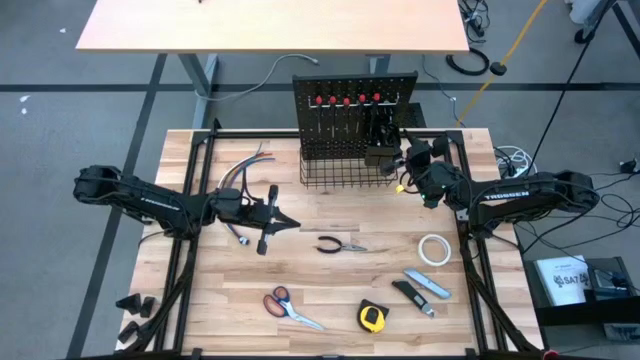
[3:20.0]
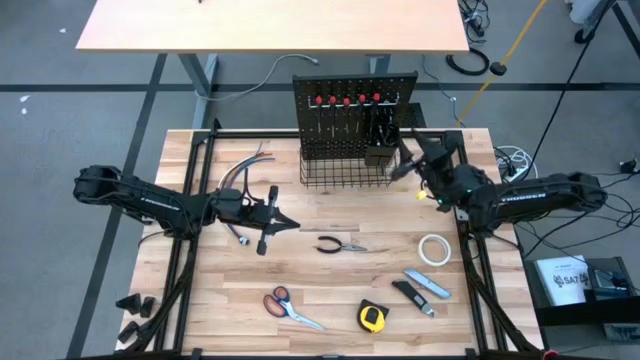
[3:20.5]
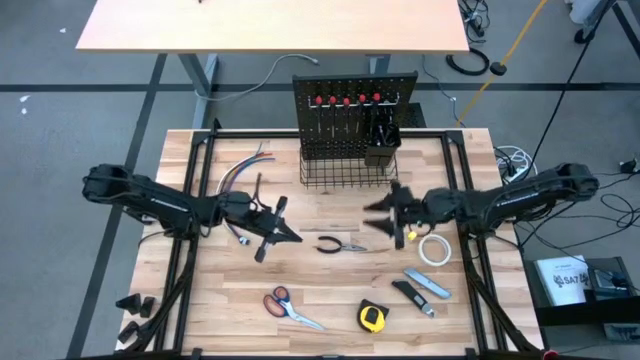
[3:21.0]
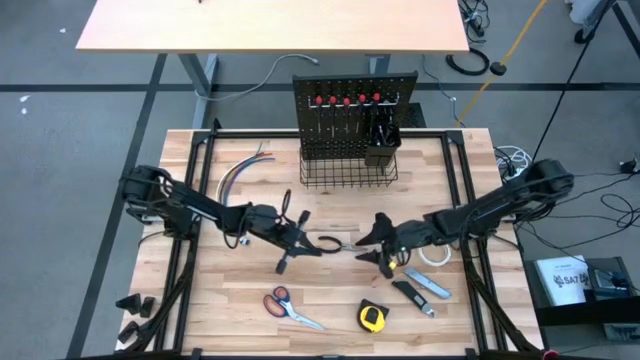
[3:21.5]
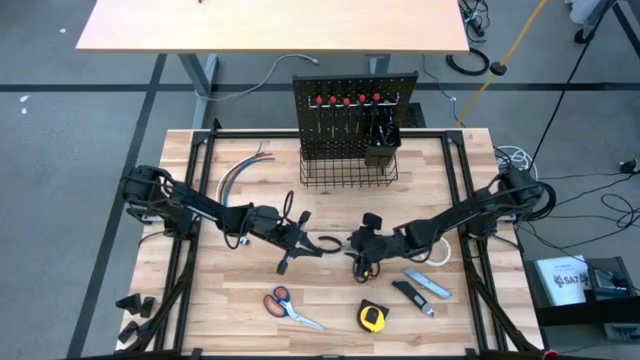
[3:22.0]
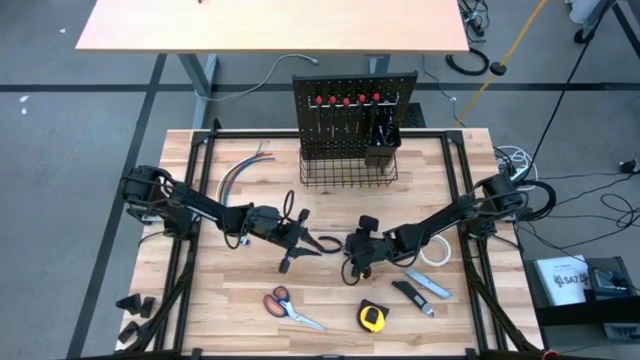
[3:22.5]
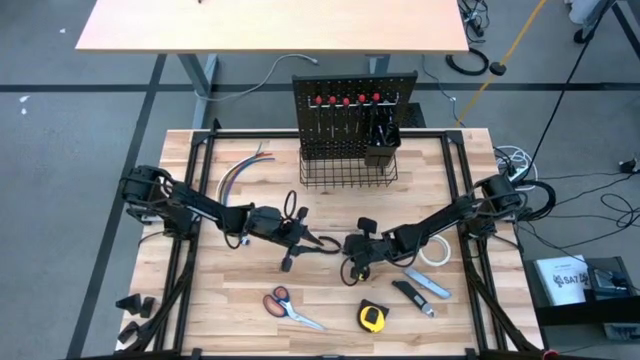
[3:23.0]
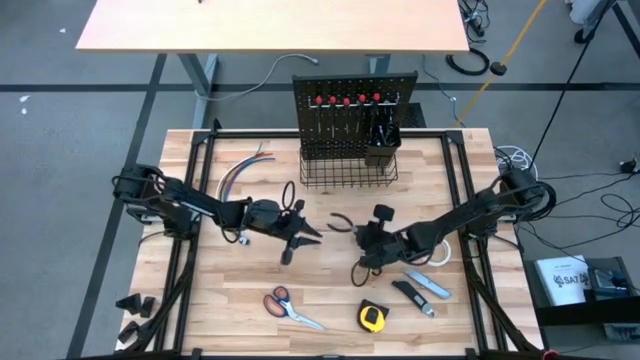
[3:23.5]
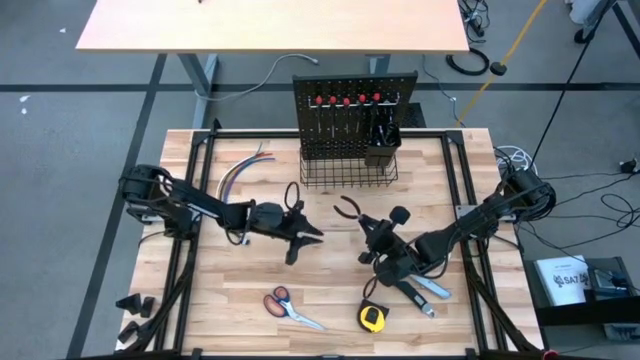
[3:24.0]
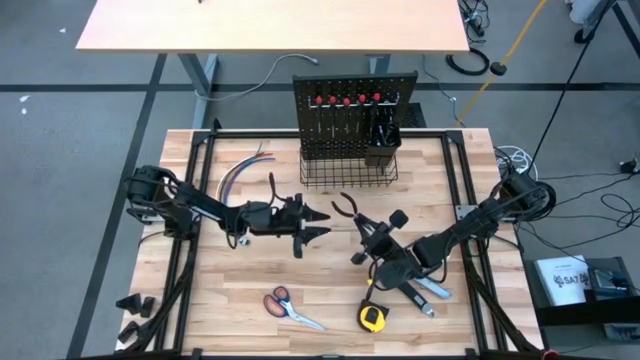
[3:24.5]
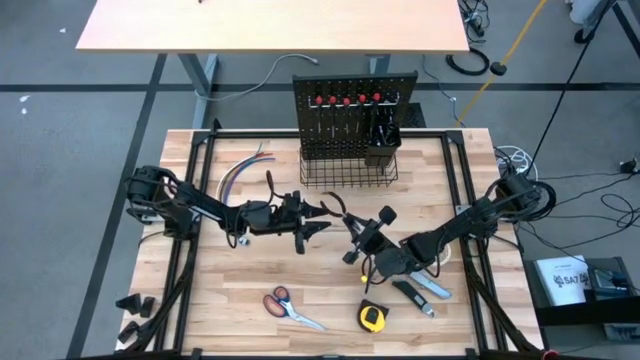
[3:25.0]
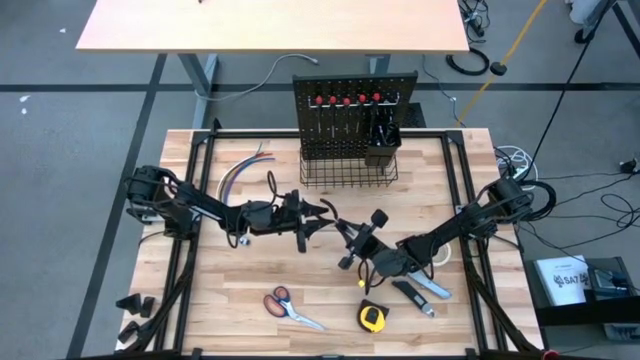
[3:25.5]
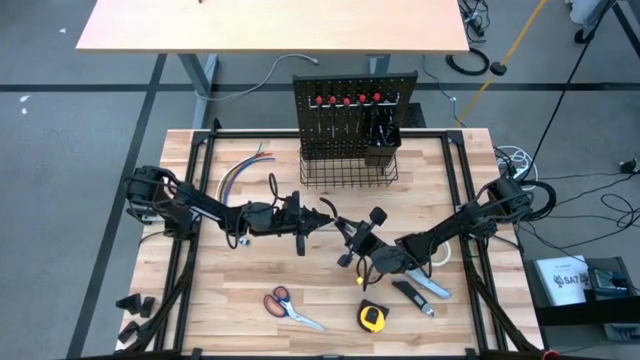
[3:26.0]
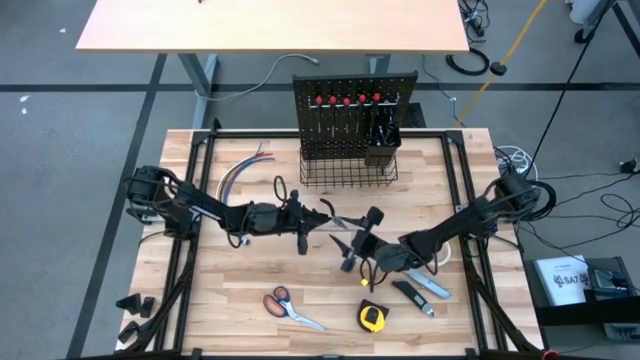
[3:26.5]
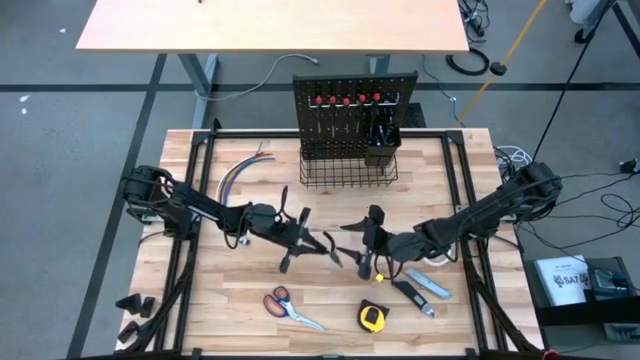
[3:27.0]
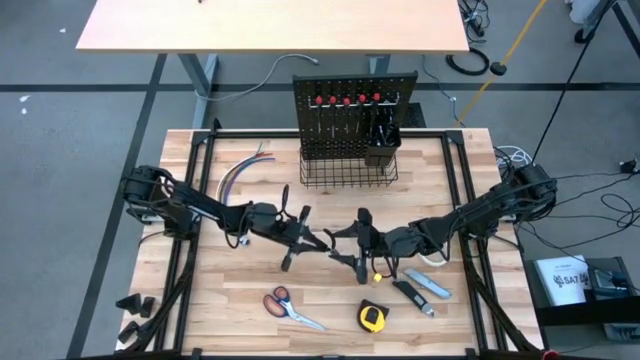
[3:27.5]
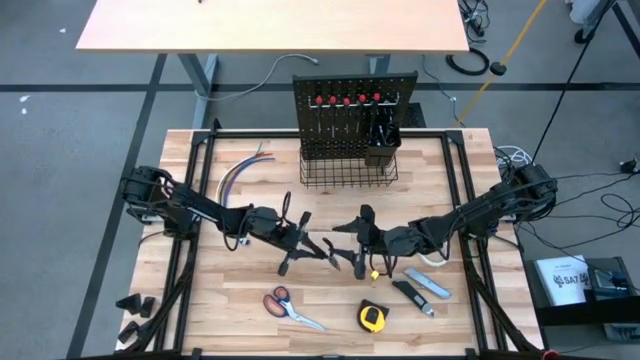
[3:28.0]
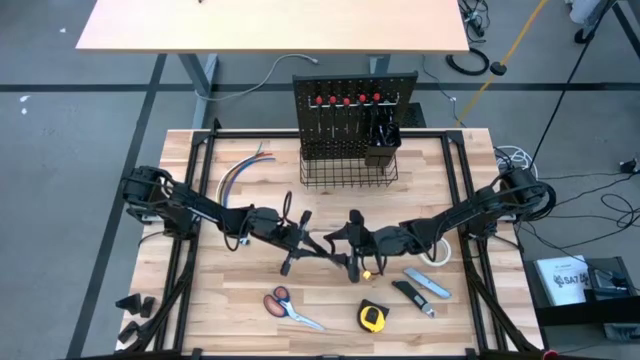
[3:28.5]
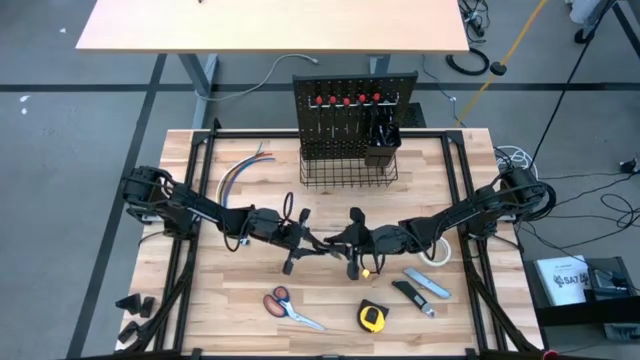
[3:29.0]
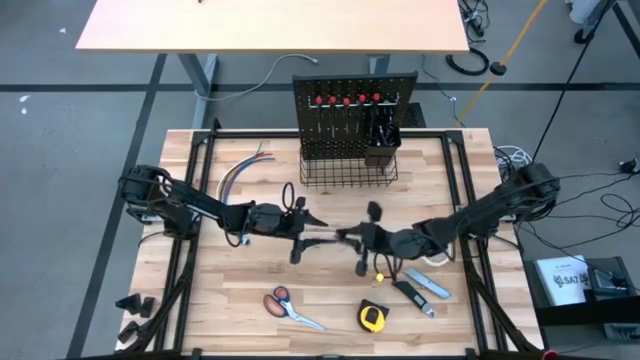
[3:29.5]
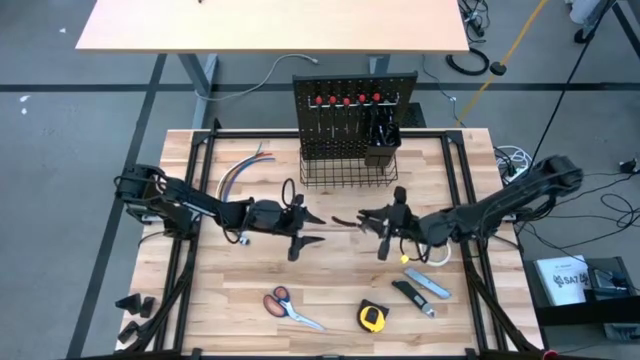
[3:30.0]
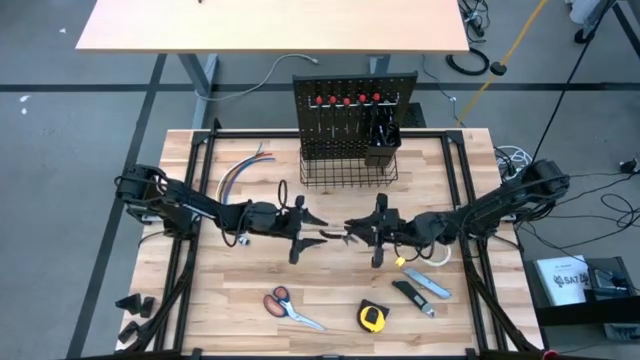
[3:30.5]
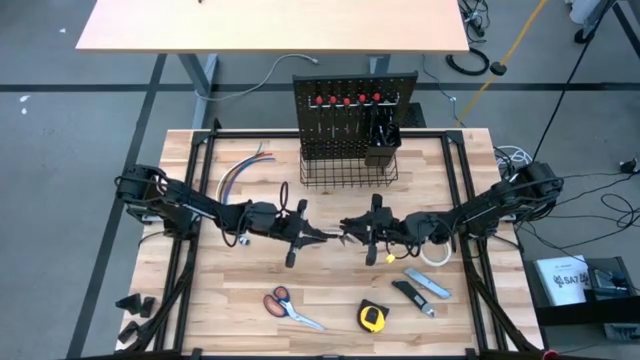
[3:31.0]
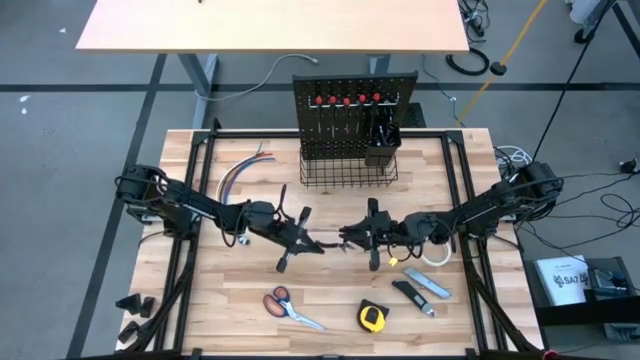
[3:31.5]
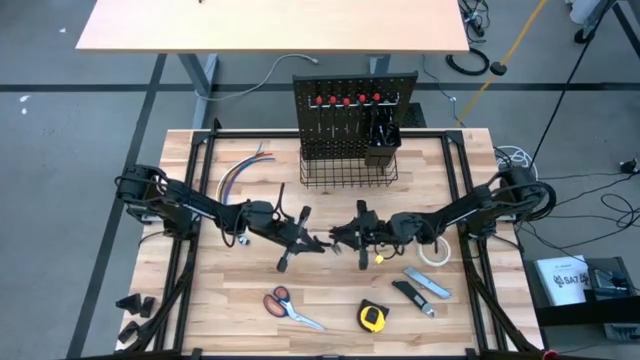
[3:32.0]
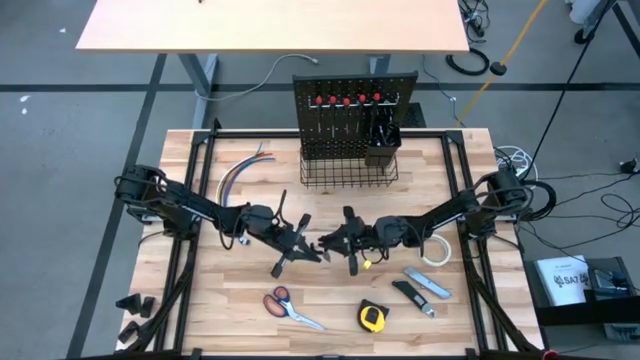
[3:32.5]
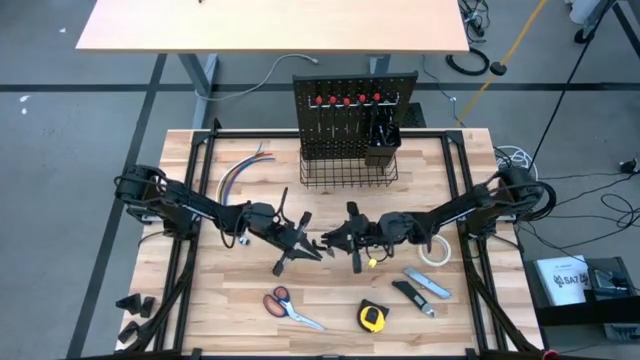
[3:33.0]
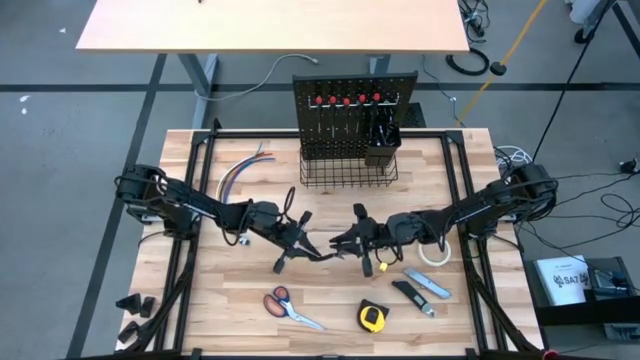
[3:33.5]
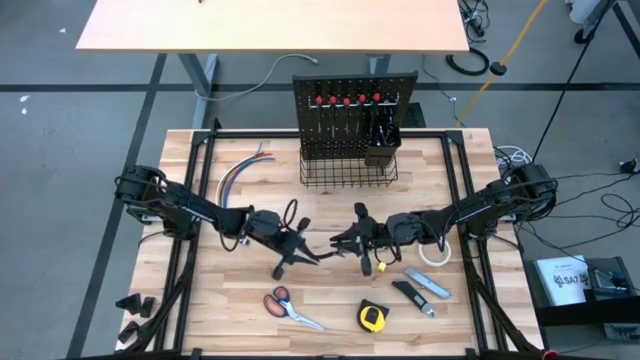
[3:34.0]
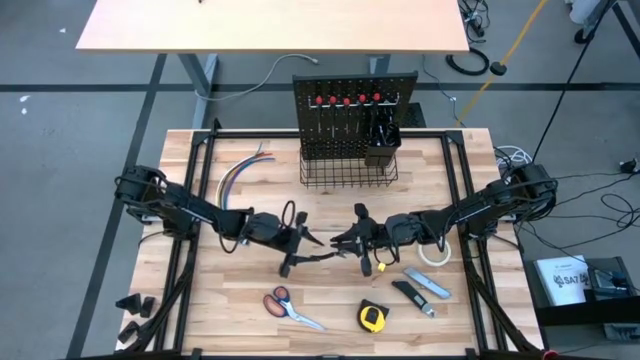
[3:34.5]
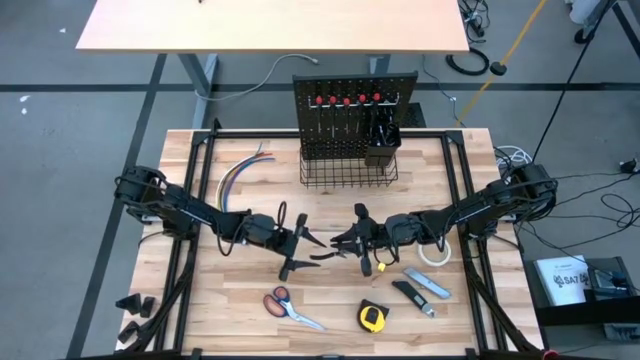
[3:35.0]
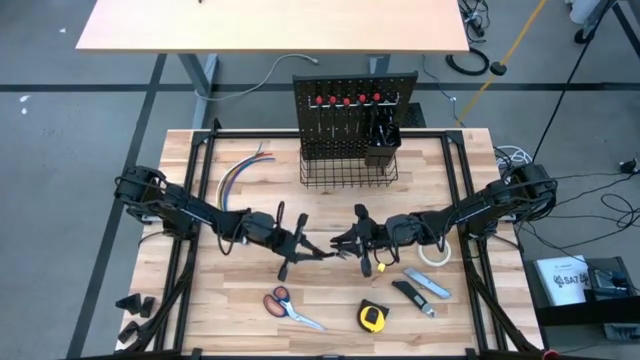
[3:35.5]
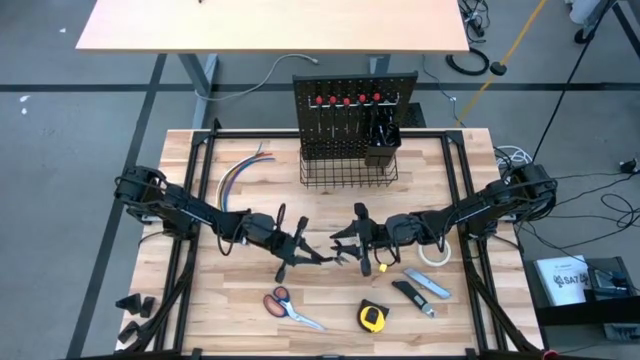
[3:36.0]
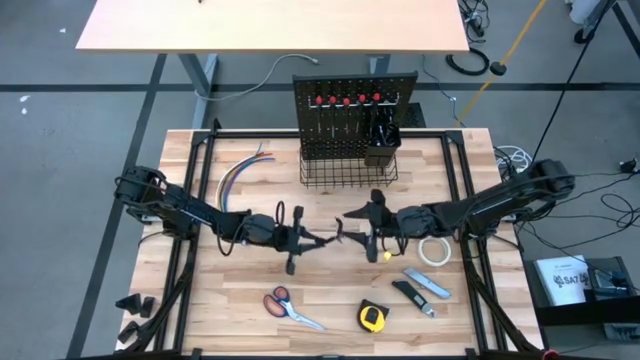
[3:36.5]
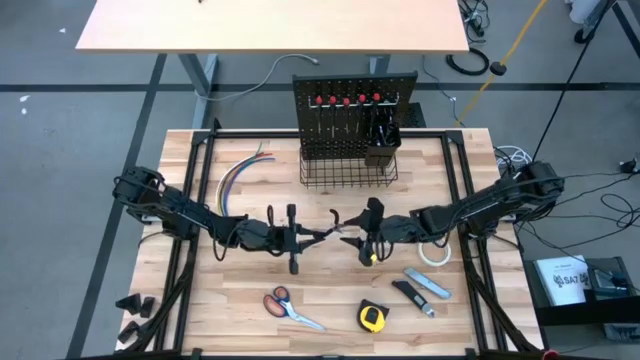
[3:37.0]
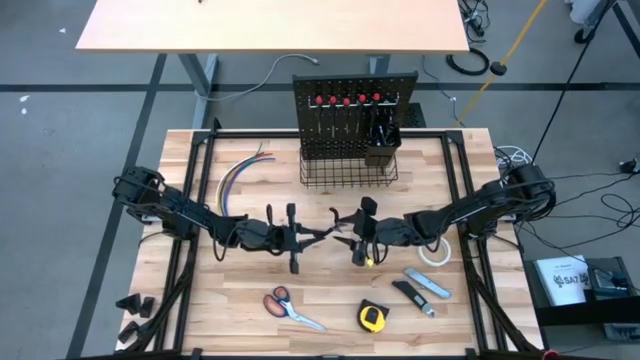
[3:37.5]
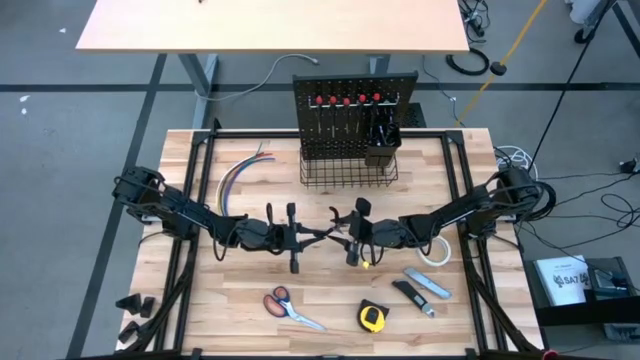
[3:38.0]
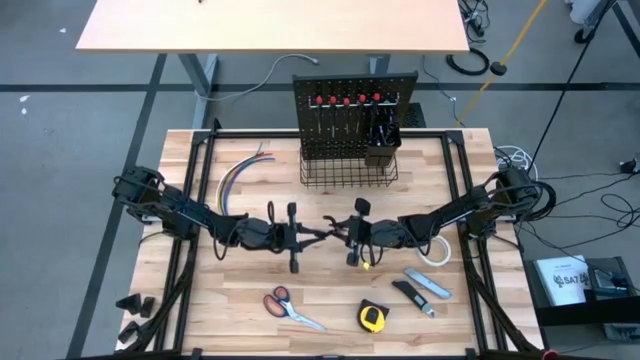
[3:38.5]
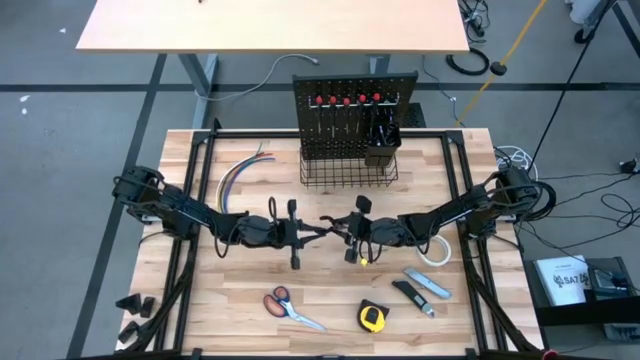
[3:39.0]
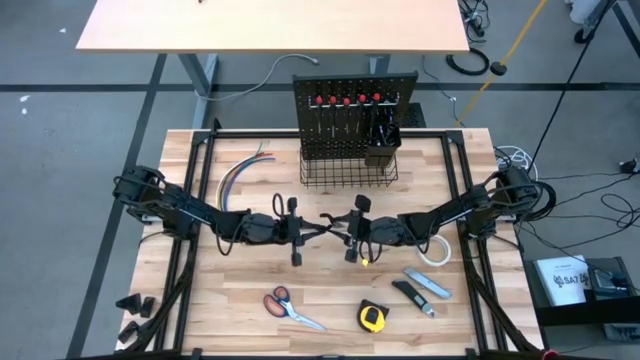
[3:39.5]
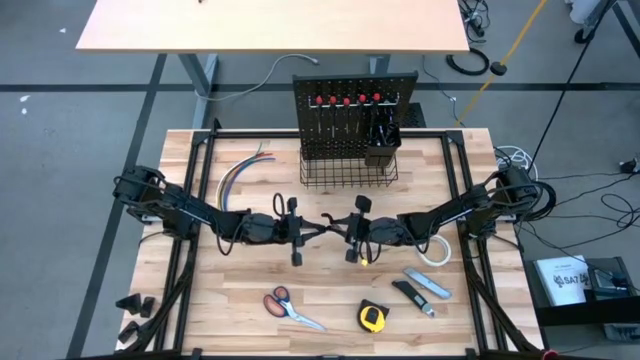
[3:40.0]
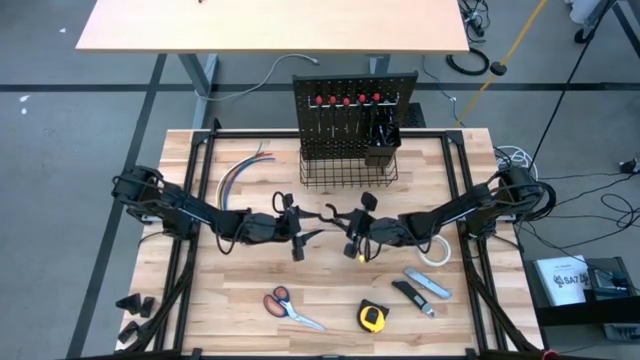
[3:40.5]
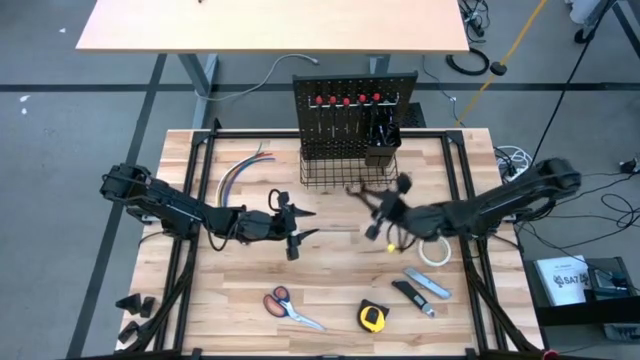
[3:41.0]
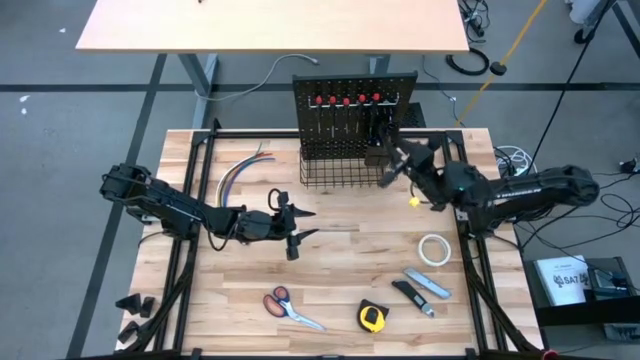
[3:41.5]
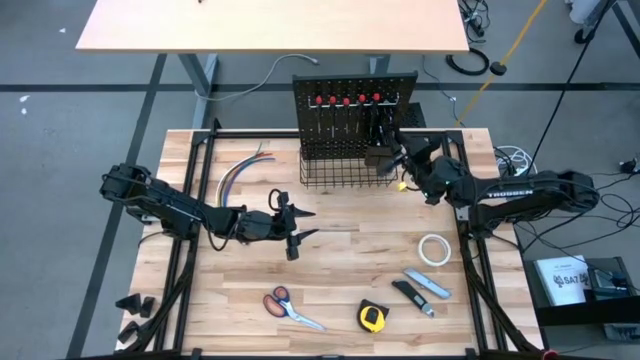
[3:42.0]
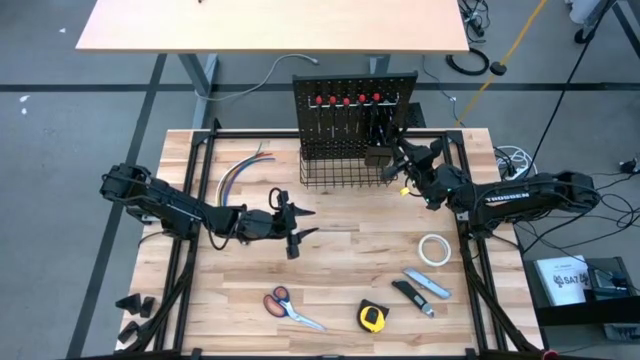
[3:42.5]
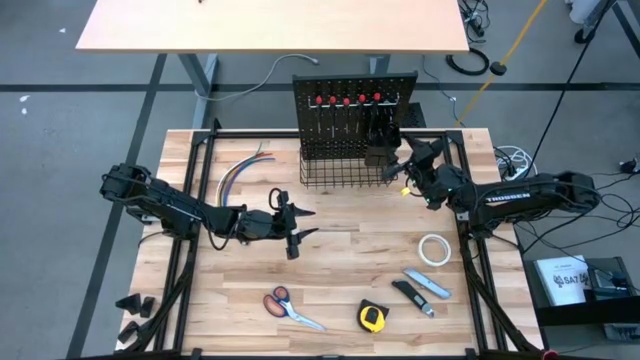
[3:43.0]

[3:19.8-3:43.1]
Task: Hang tools onto peg board
Put the plier into the black bin on the pegboard
